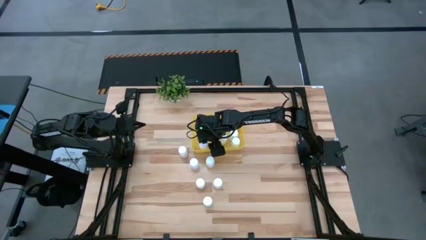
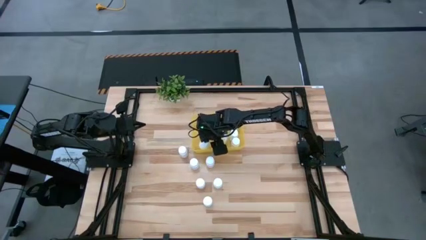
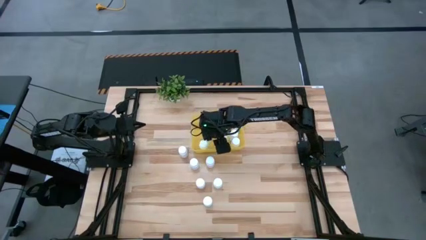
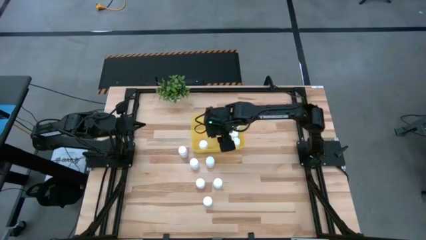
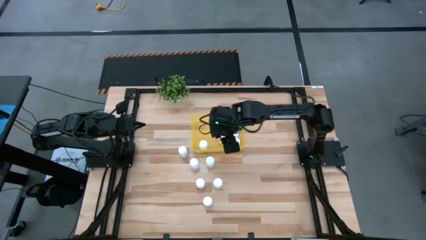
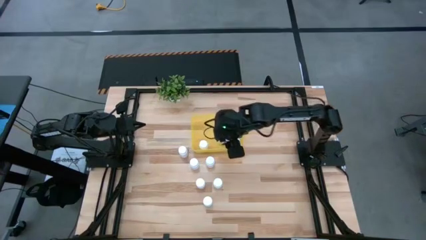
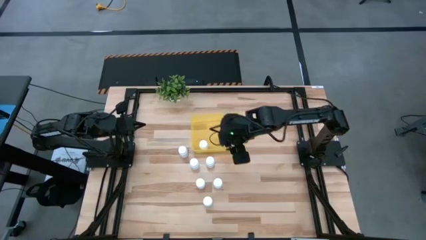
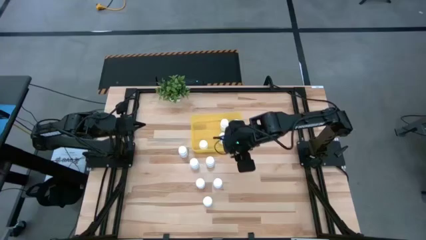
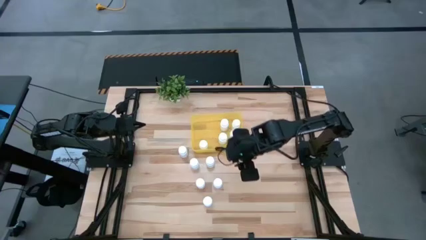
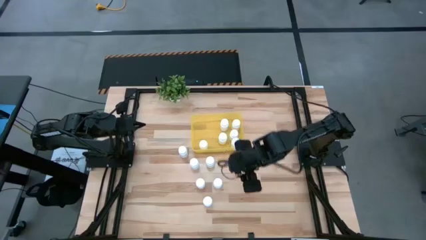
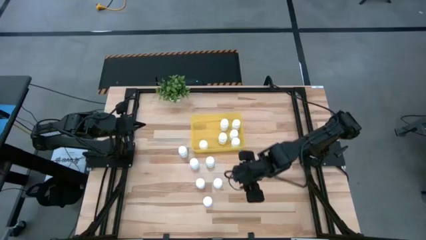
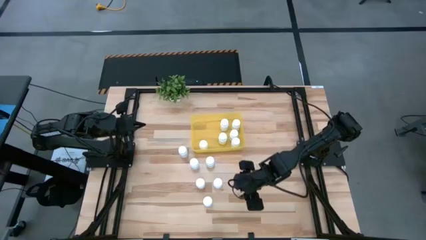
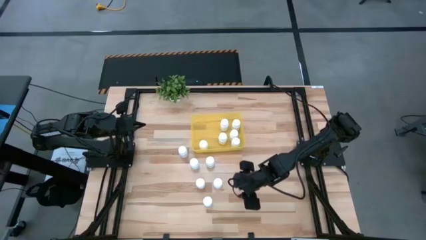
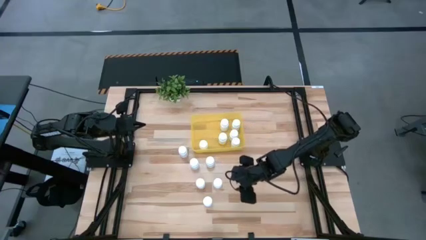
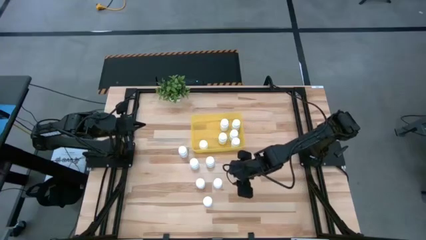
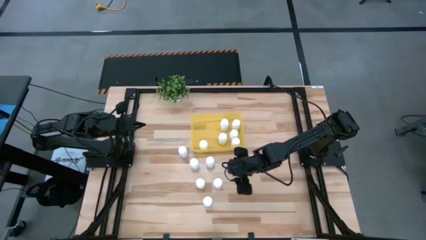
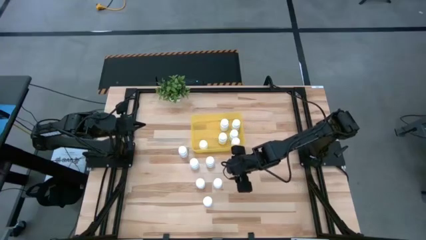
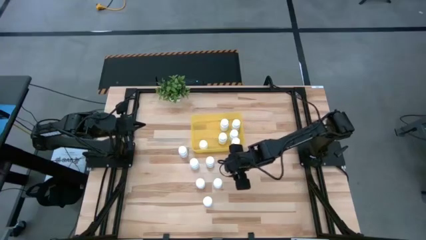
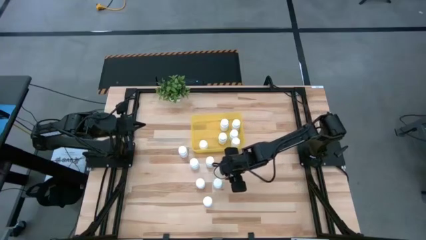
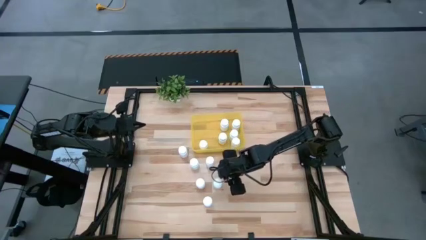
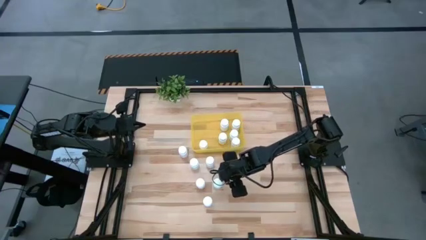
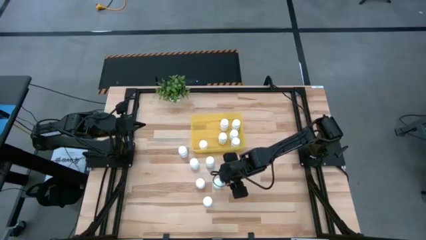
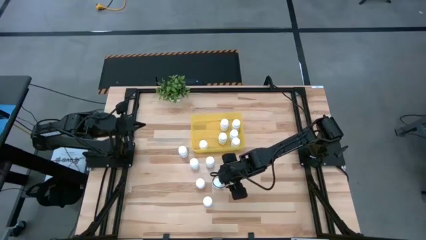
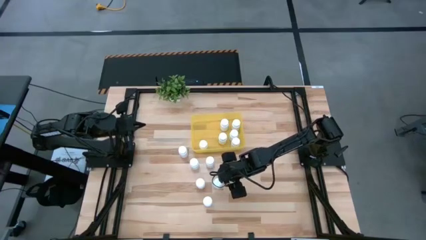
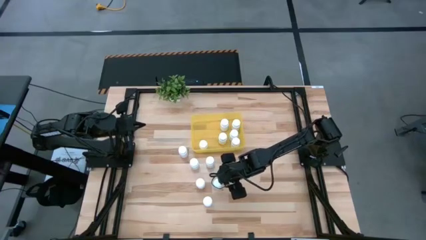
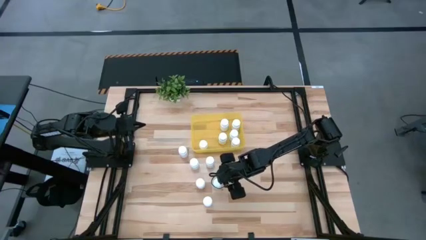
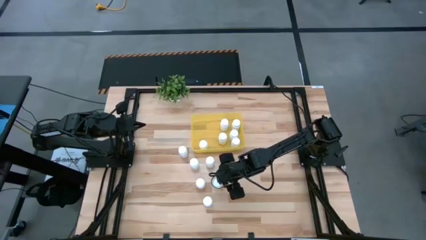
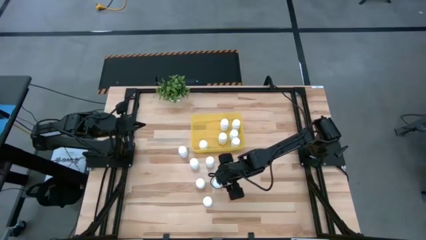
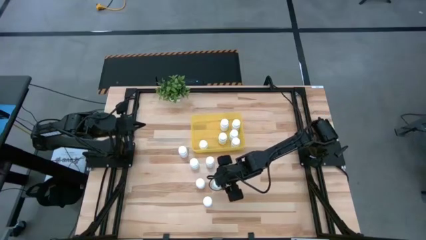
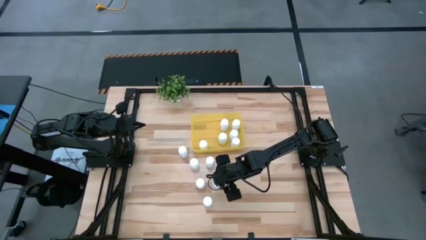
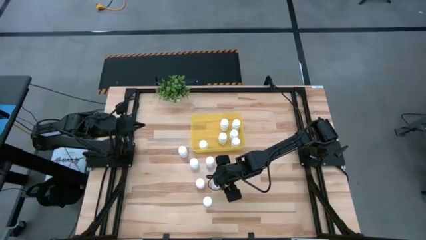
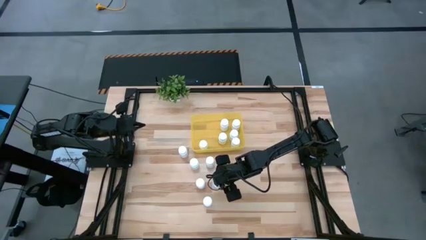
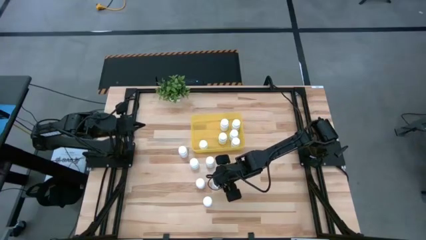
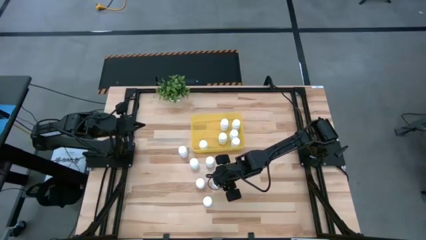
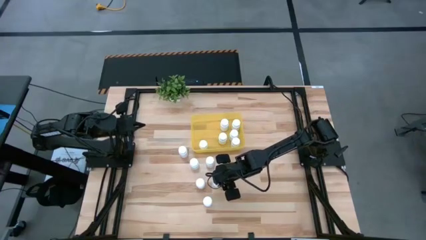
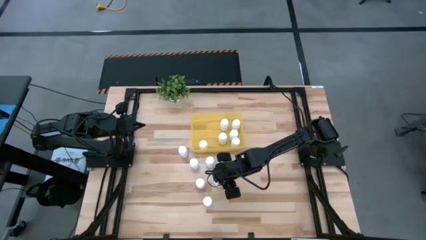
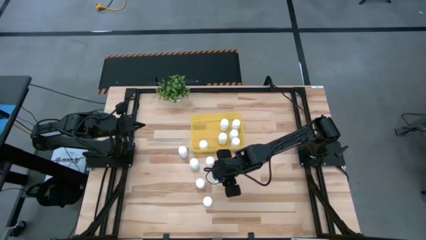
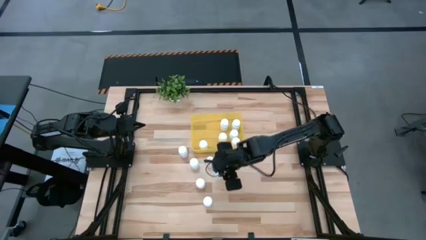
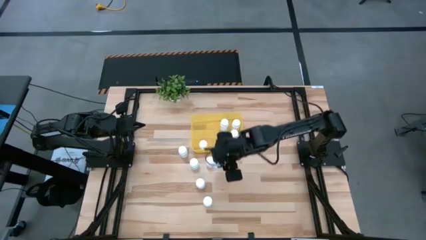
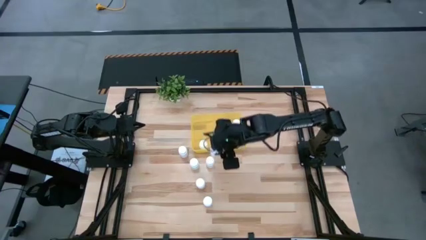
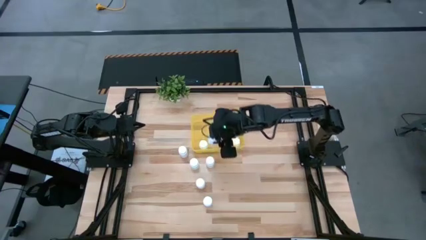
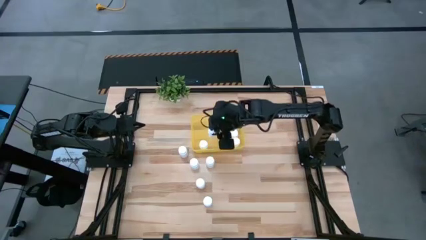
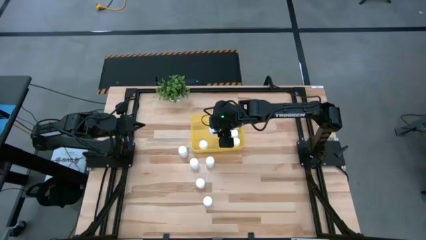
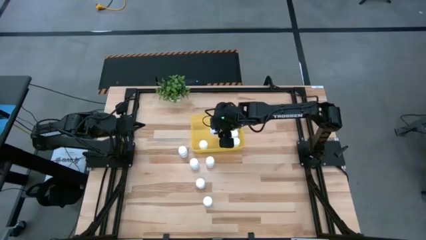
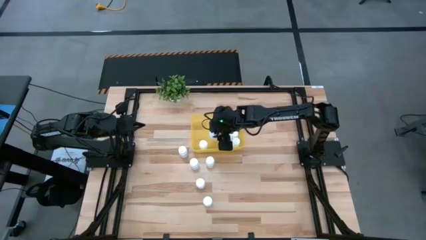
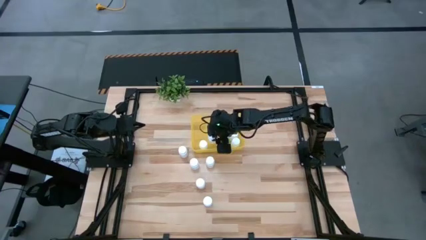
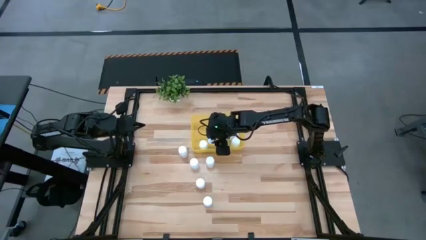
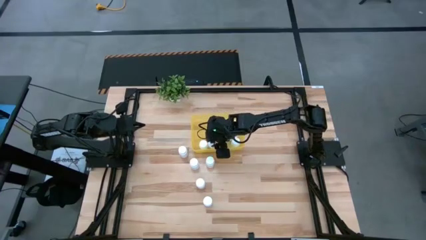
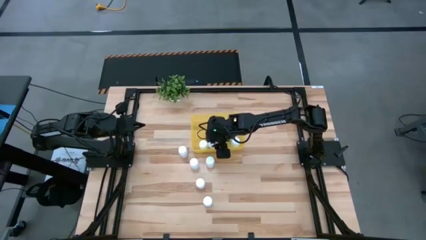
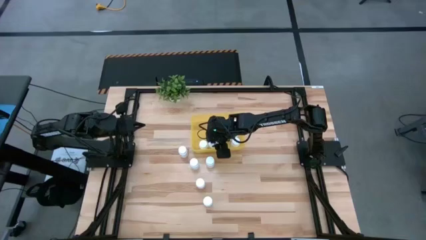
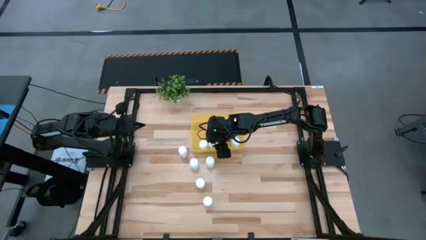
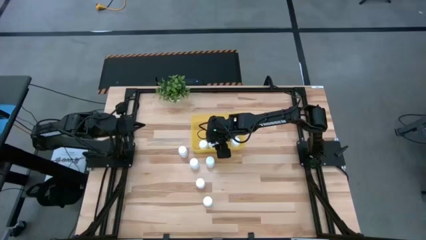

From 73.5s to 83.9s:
Task: Pick and place pill bottles into a basket
Put the white medicine bottle into the yellow bin
